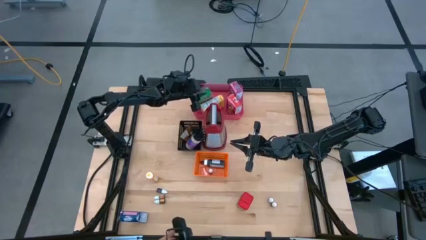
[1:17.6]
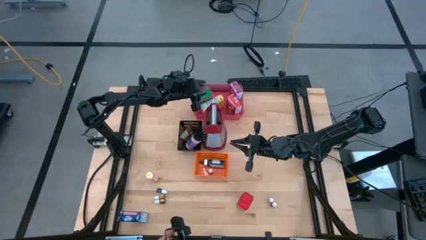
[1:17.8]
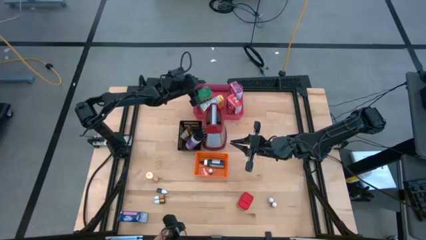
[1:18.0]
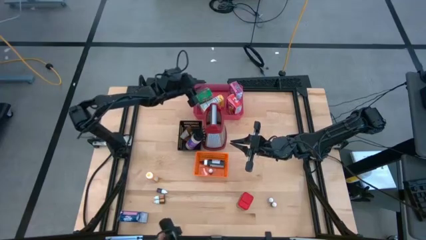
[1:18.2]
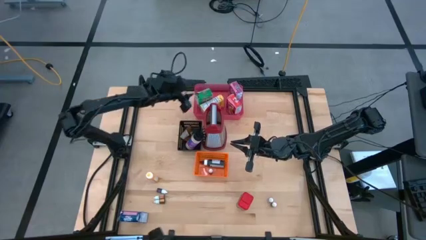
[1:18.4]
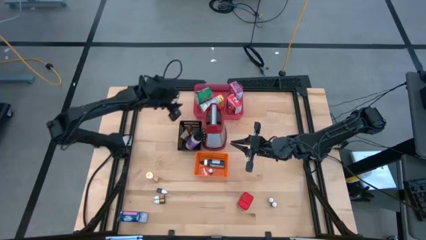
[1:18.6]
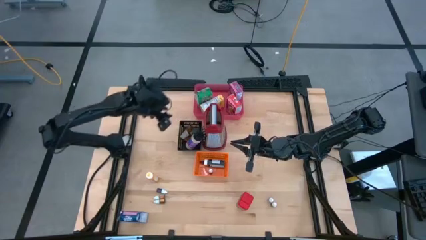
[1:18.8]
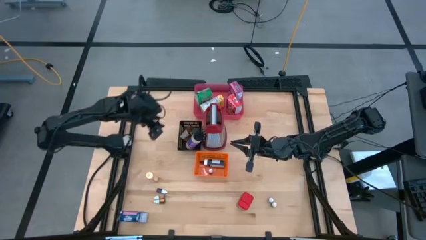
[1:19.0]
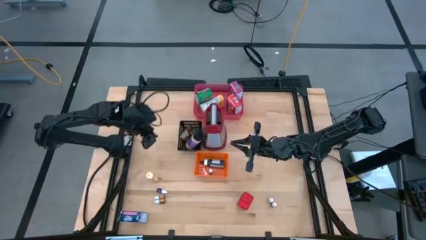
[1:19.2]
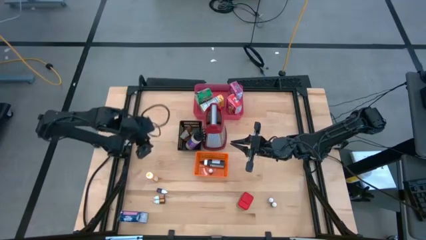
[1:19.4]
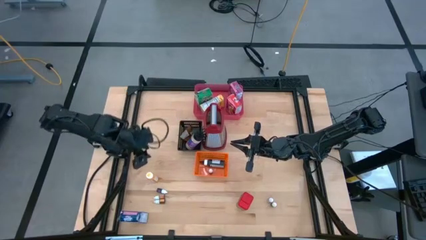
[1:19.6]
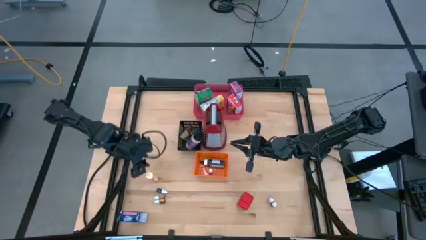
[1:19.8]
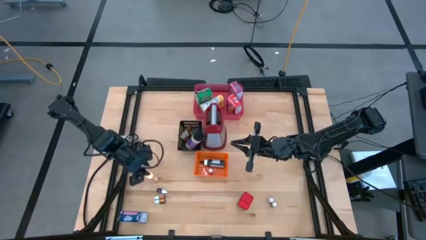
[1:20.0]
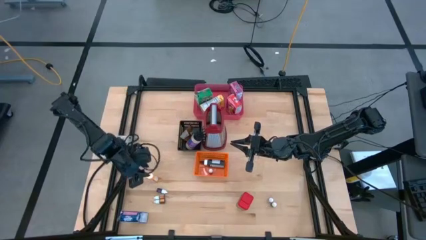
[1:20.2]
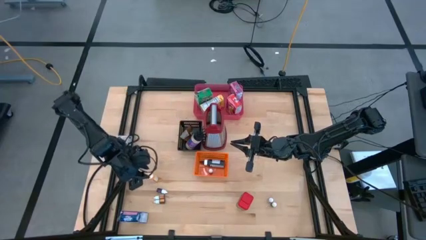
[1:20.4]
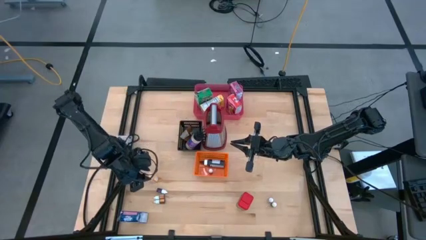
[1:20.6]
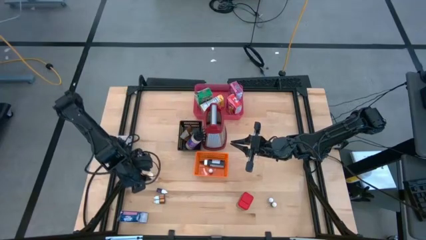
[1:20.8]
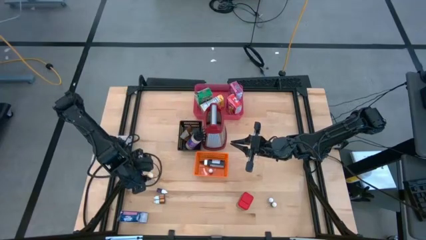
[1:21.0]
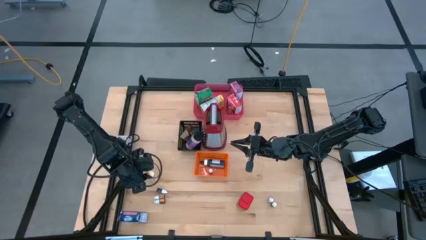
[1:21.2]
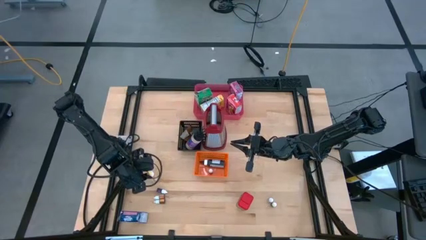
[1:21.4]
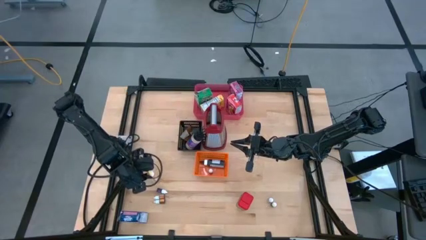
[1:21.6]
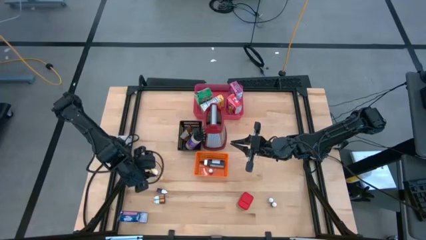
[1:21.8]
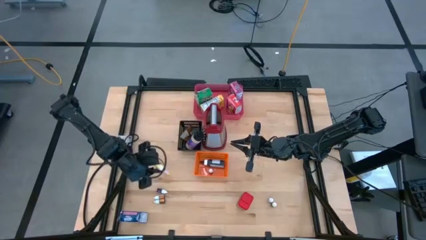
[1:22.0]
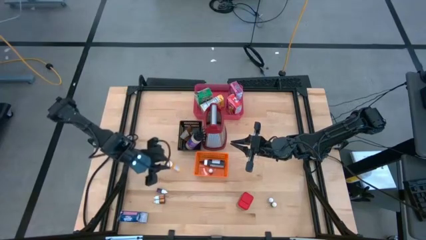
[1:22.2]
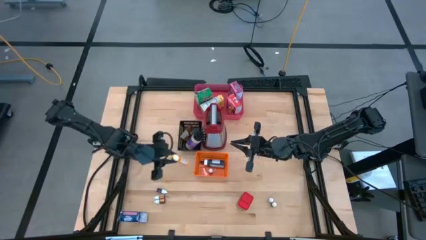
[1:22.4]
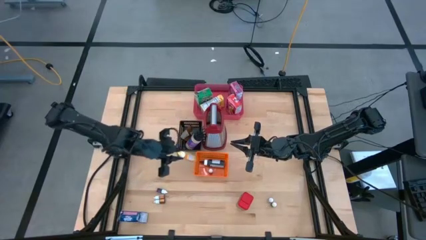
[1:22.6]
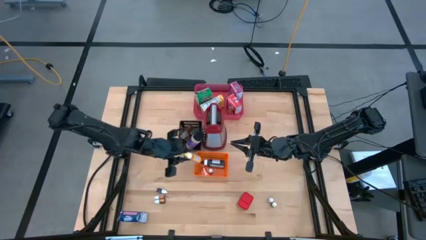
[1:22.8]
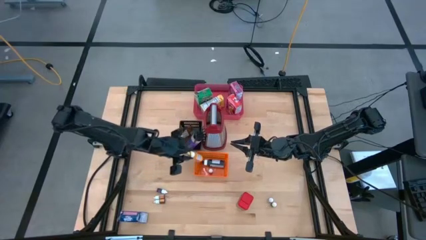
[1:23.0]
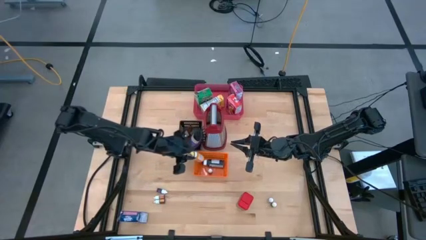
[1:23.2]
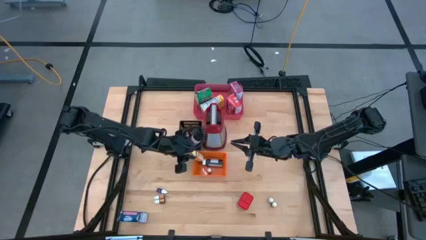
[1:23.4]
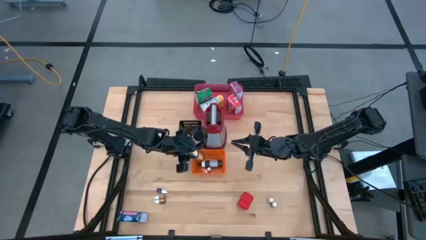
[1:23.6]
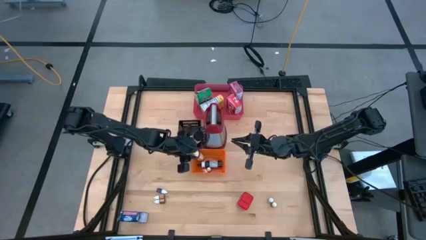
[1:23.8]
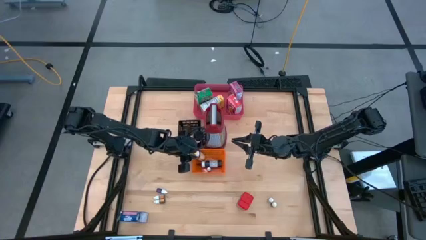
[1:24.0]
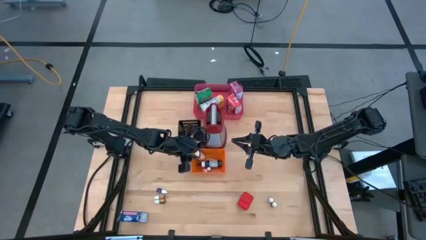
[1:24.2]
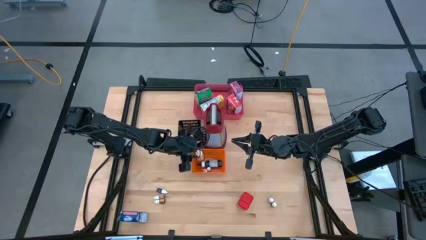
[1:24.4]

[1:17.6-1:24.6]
Task: Pick & Place Kitchen Items
Put the large yellow food coloring bottle into the orange bin

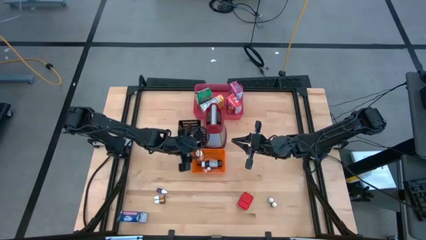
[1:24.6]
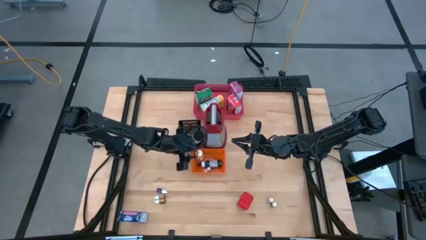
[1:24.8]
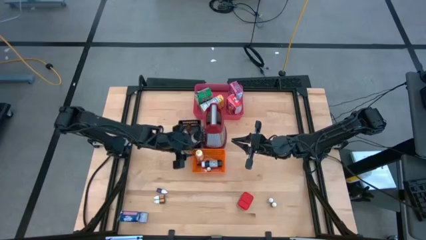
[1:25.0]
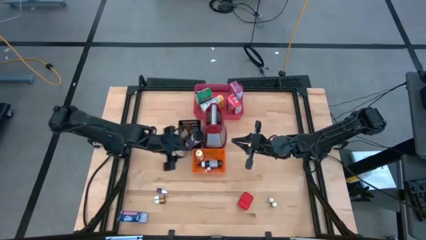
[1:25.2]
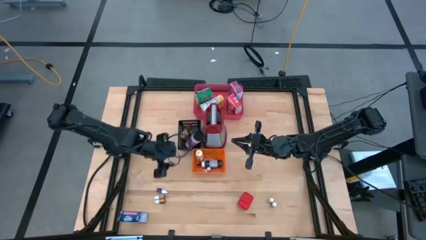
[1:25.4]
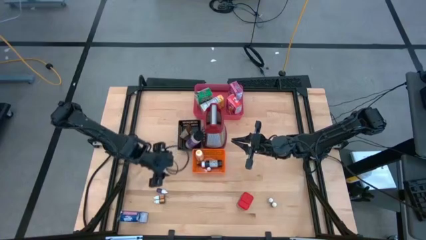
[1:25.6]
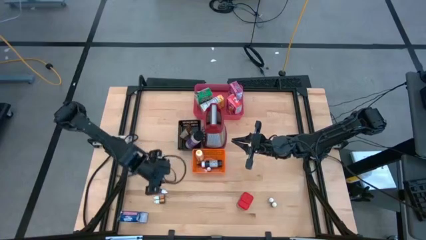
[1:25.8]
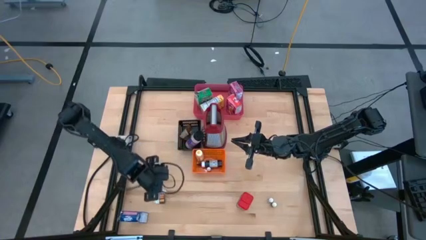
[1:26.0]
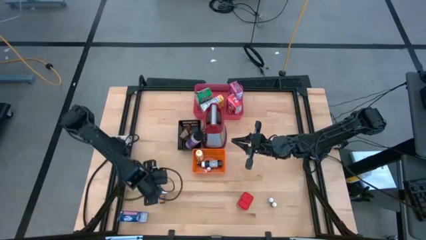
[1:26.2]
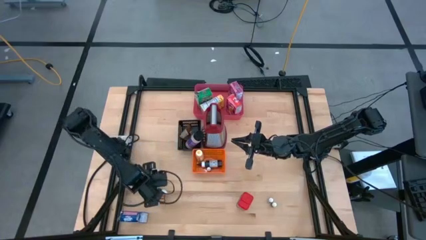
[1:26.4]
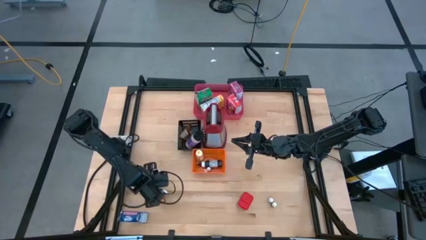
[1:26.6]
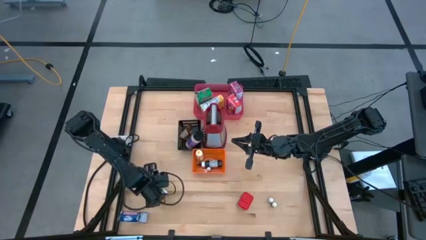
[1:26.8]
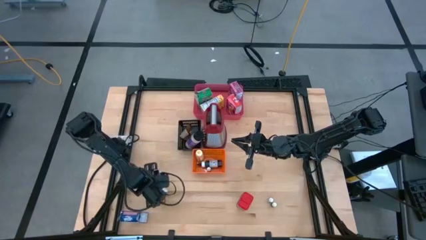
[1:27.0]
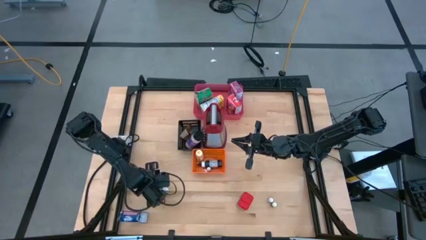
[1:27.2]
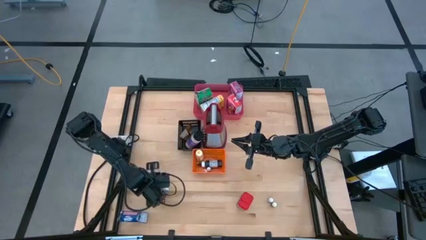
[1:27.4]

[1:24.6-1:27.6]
Put the blue food coloring bottle into the orange bin

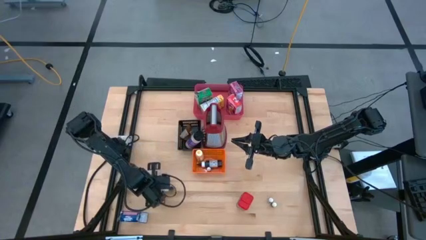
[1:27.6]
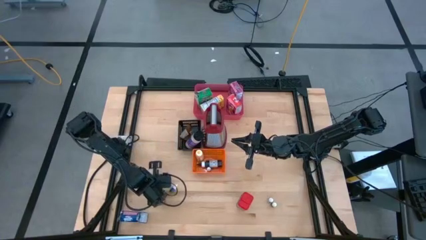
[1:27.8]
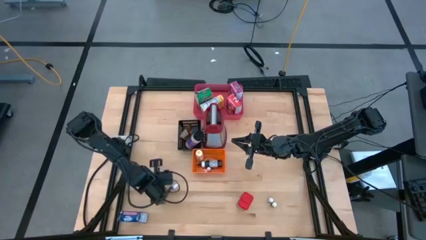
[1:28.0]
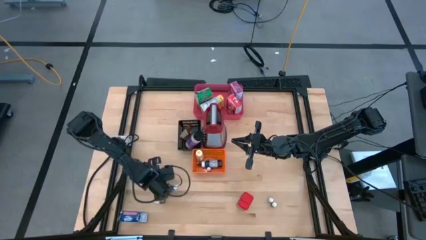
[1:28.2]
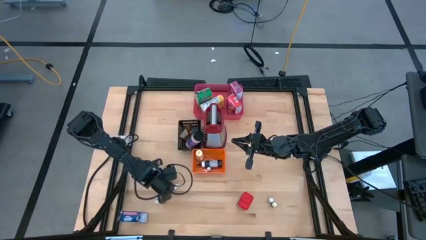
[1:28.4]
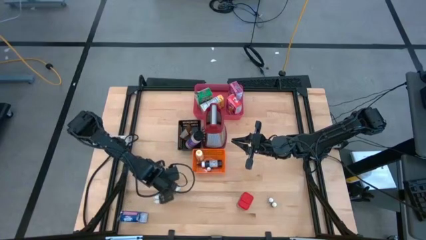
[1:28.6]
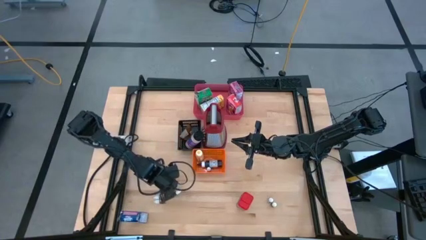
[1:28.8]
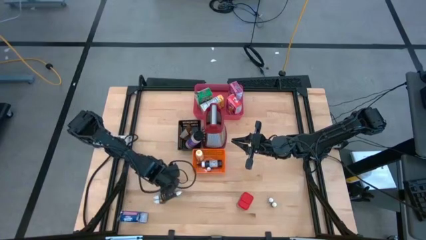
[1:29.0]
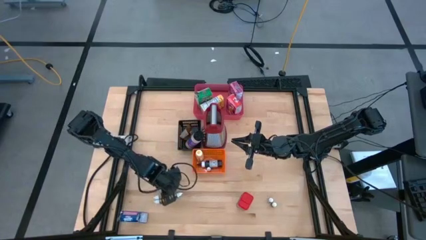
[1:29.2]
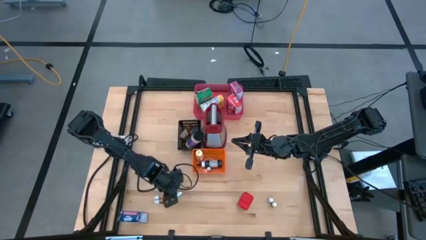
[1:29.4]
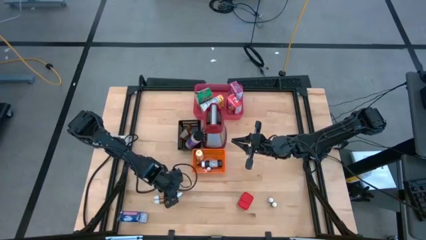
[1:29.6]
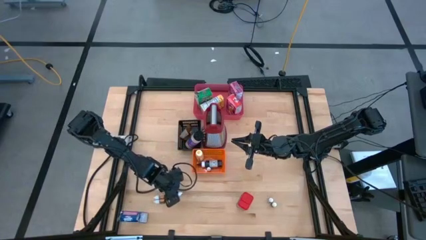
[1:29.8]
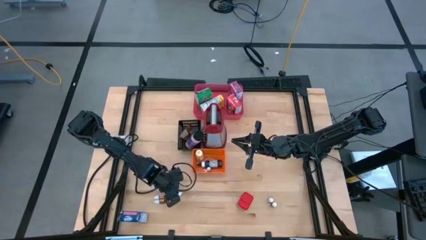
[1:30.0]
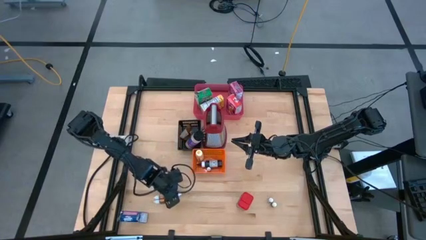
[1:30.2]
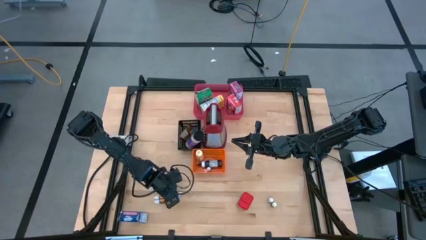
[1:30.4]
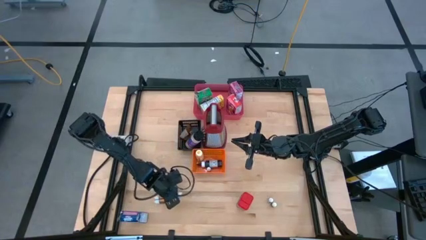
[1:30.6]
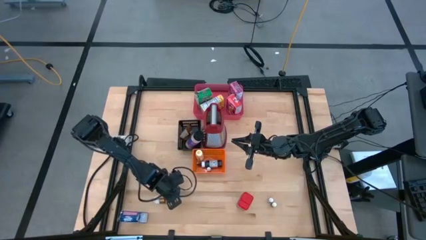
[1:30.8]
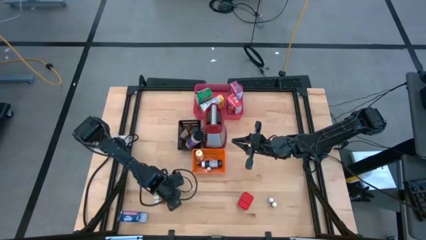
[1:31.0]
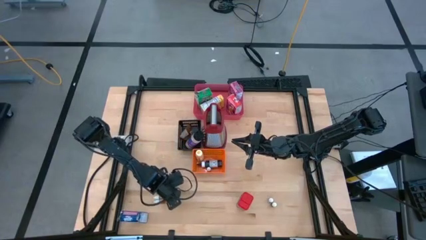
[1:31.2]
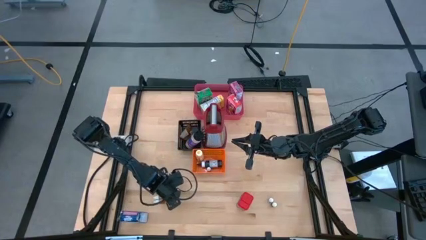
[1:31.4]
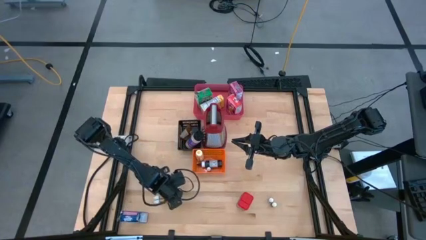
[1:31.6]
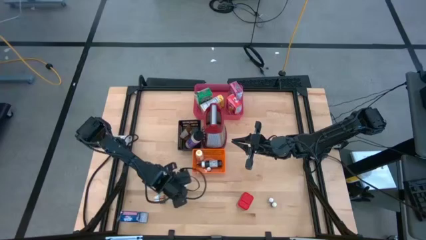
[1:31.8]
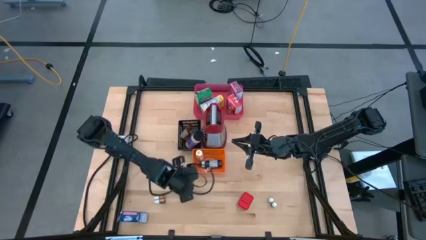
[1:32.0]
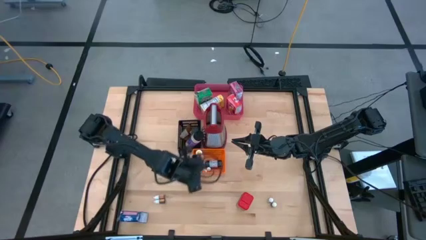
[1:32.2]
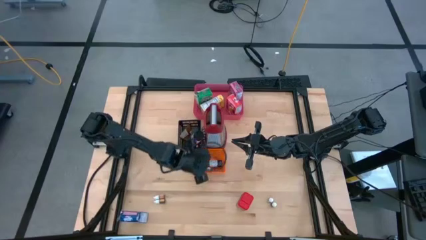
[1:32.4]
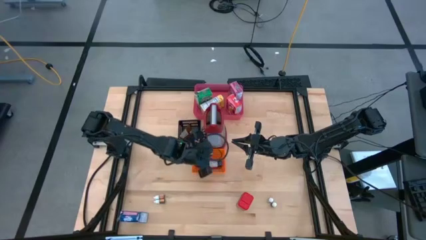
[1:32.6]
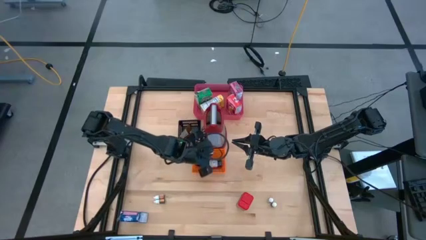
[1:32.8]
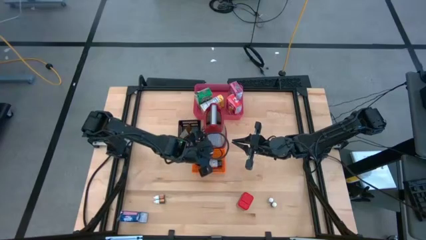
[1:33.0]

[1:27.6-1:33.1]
Put the blue food coloring bottle into the orange bin
